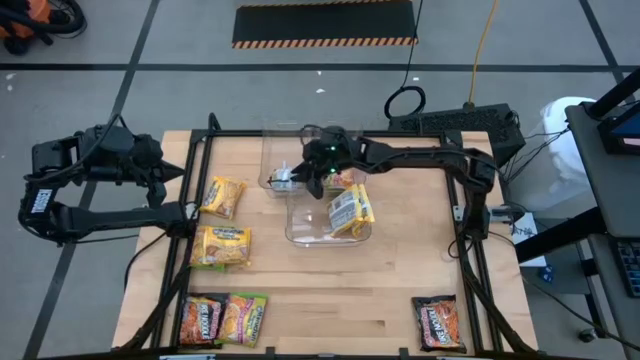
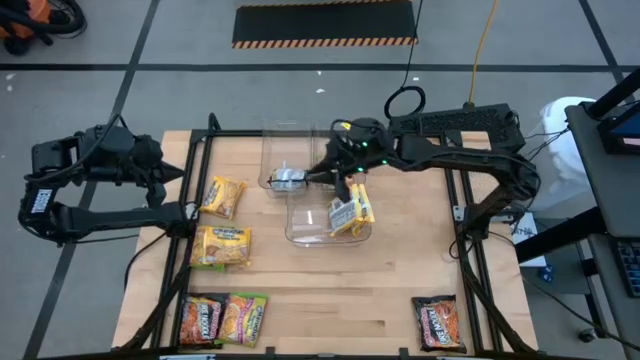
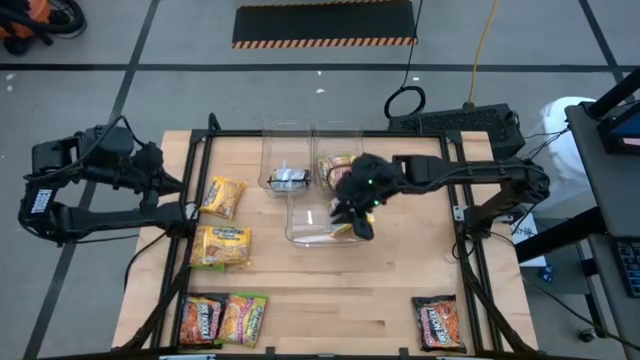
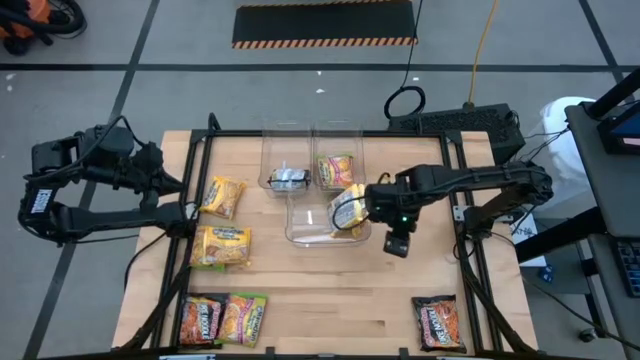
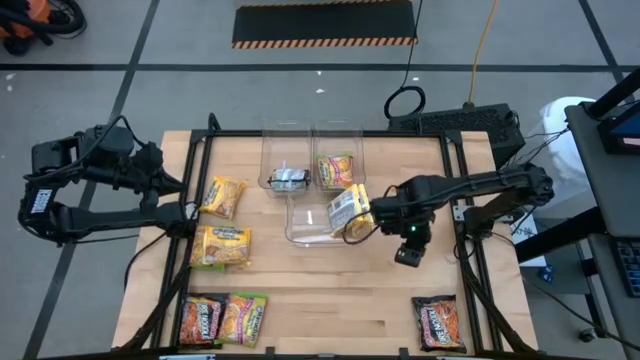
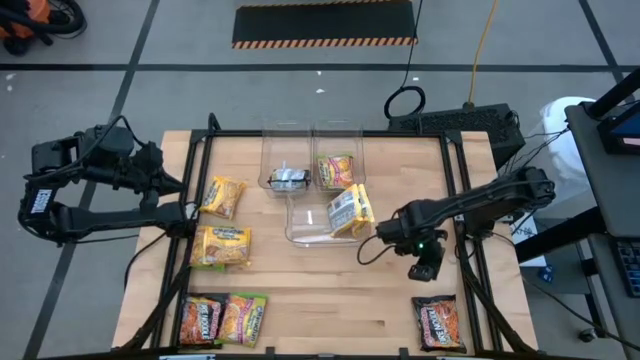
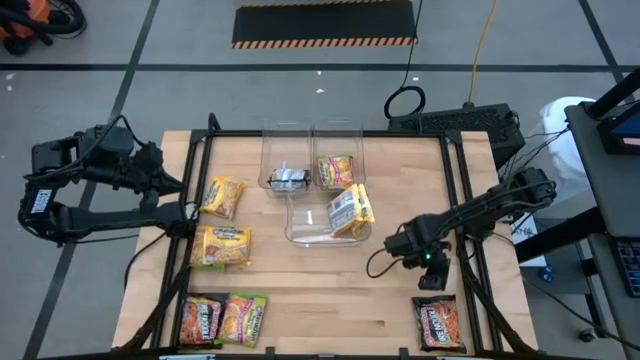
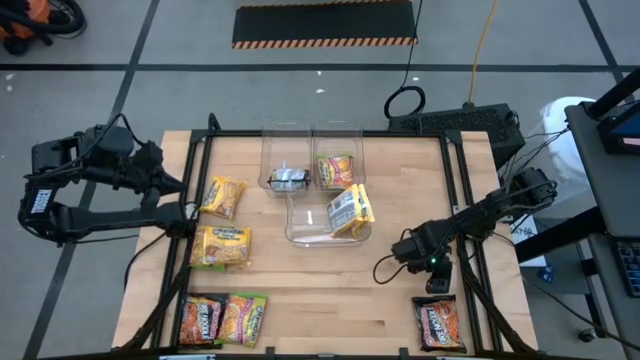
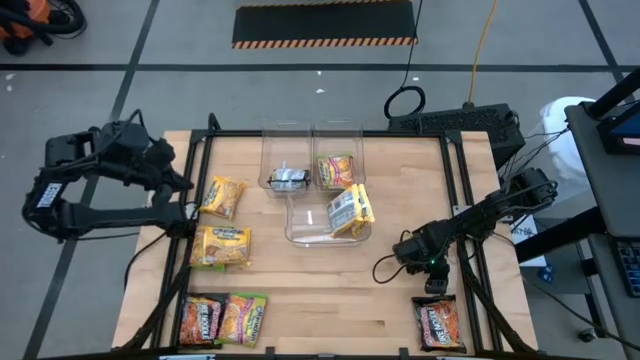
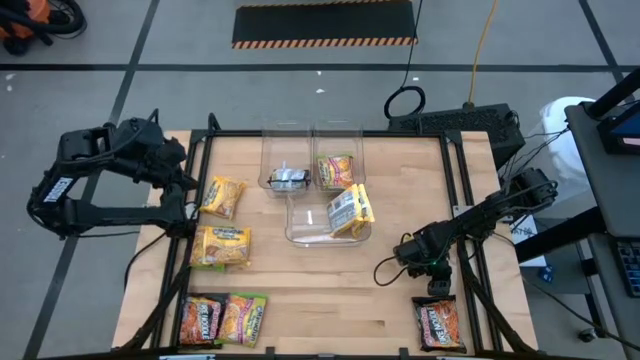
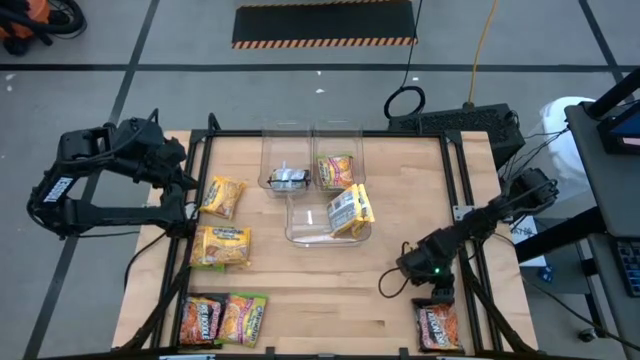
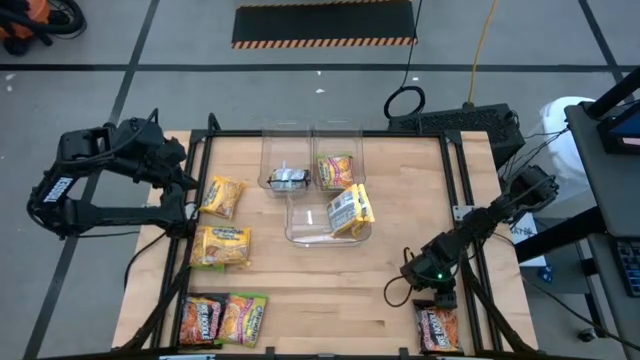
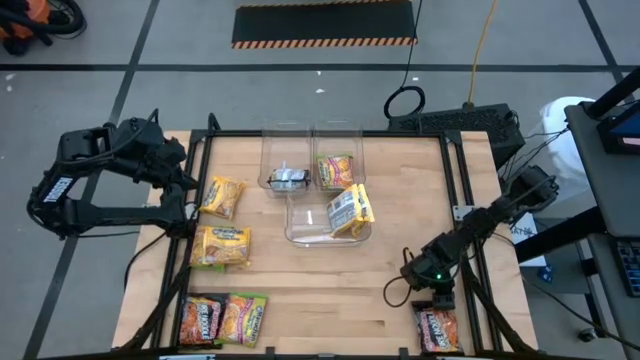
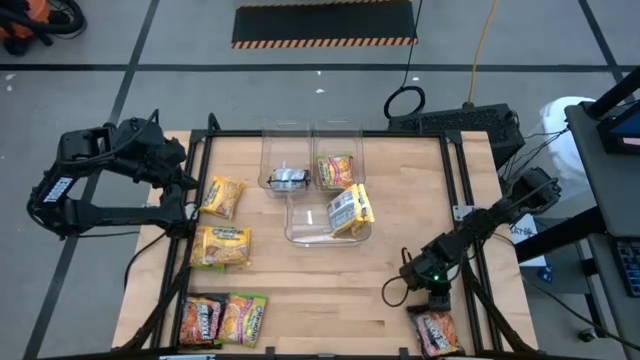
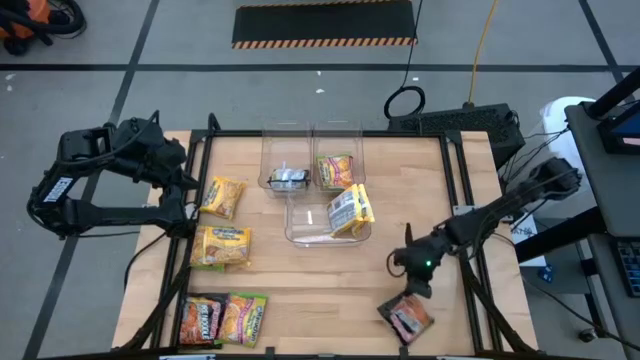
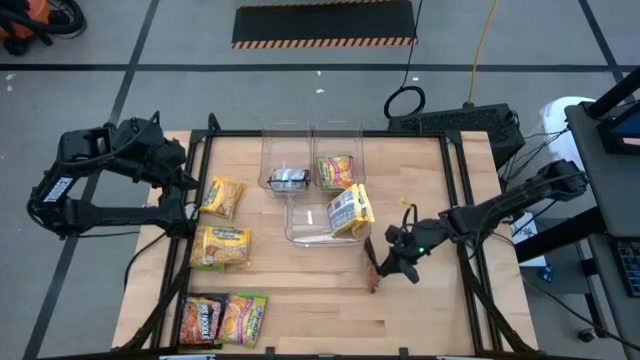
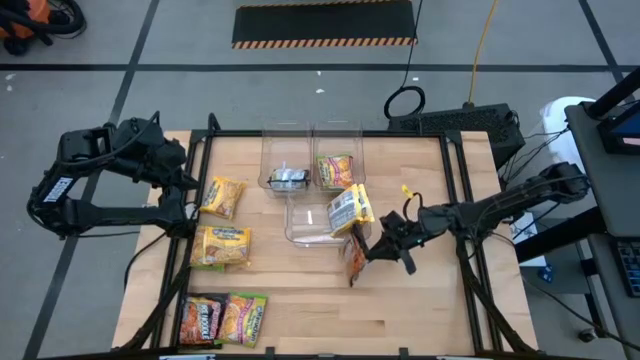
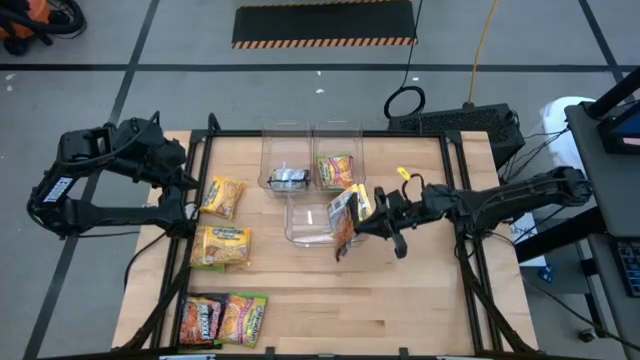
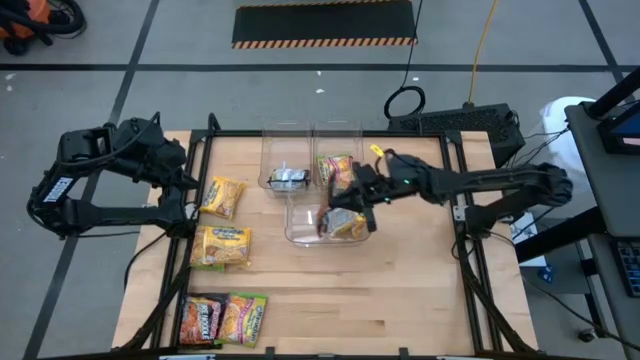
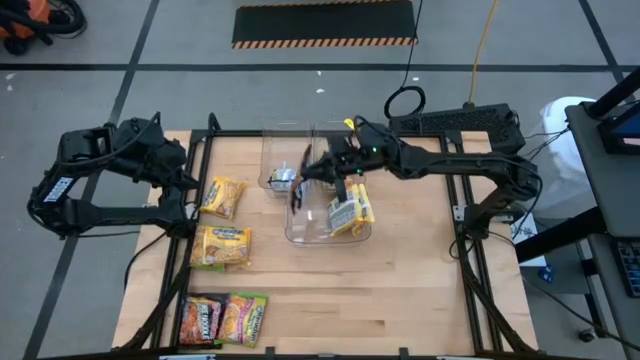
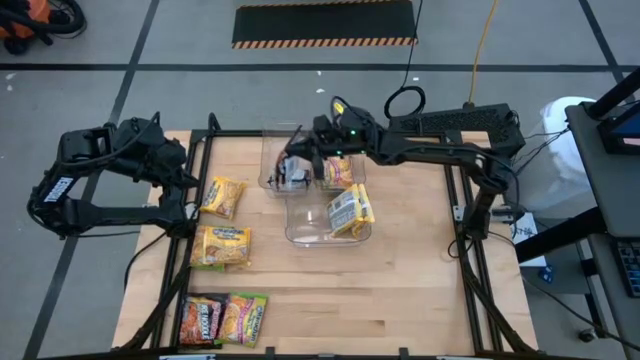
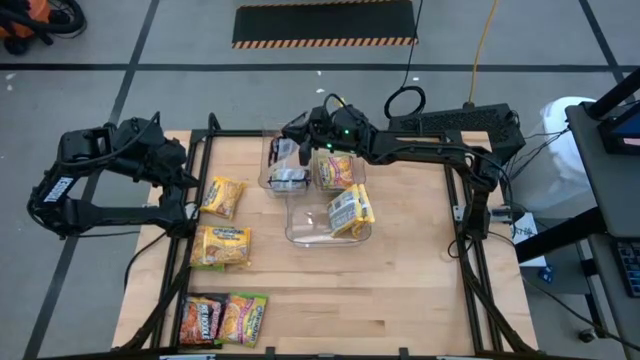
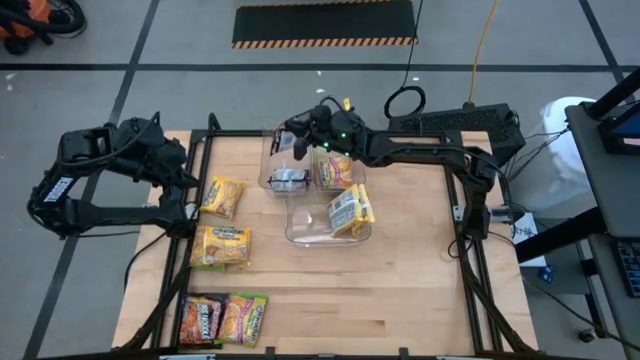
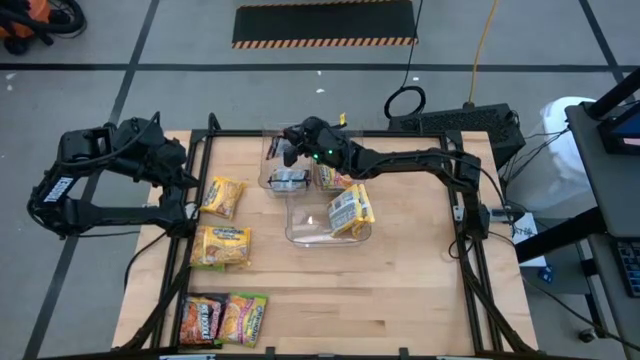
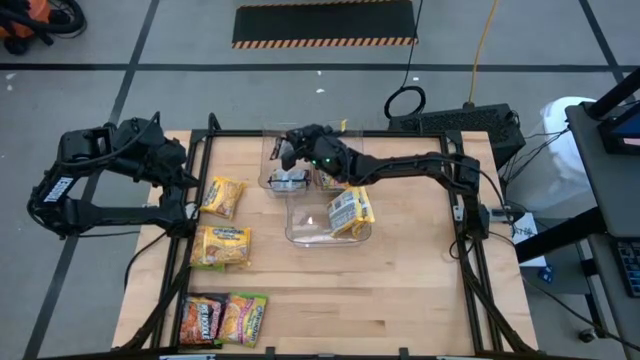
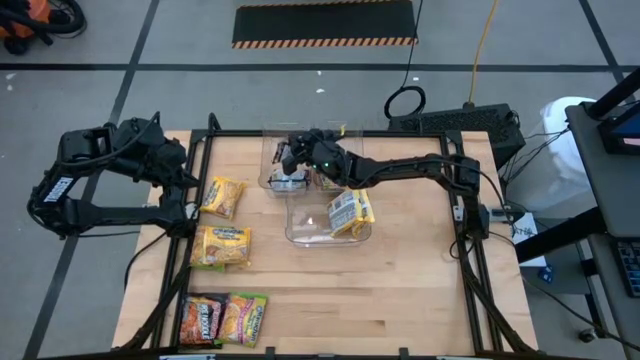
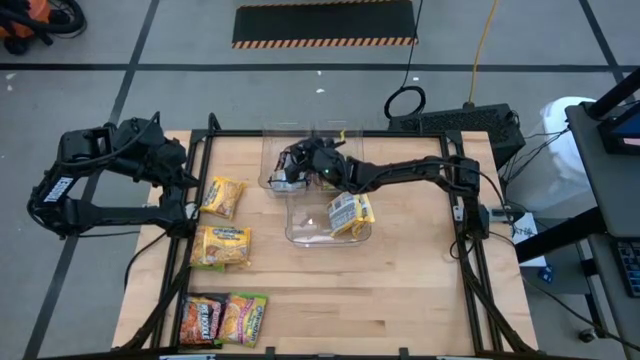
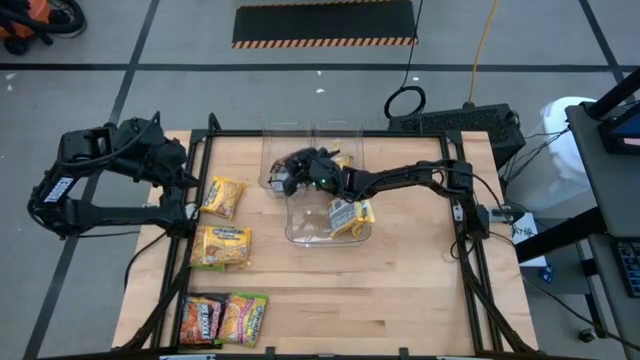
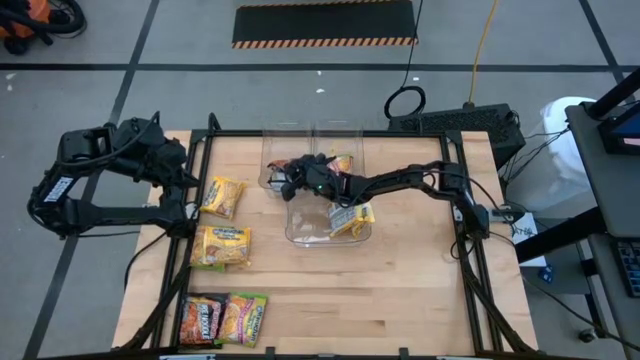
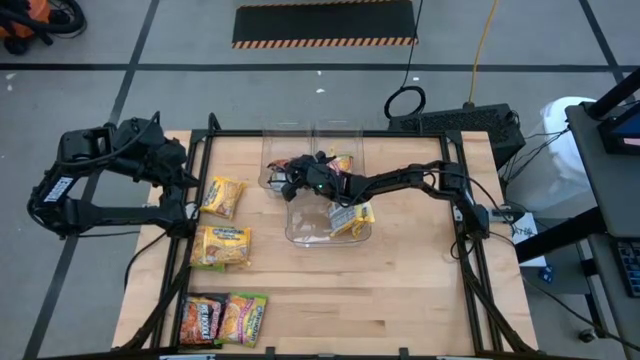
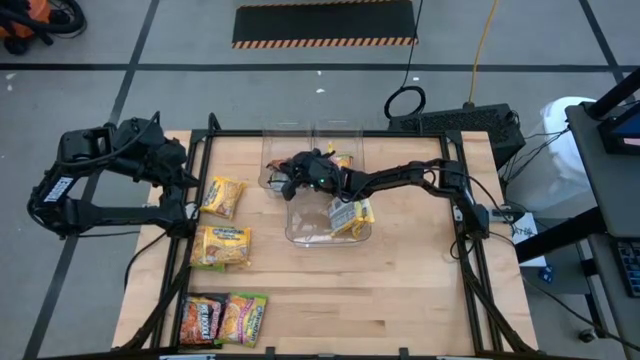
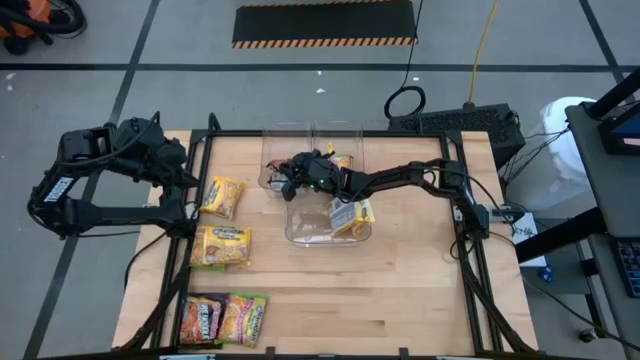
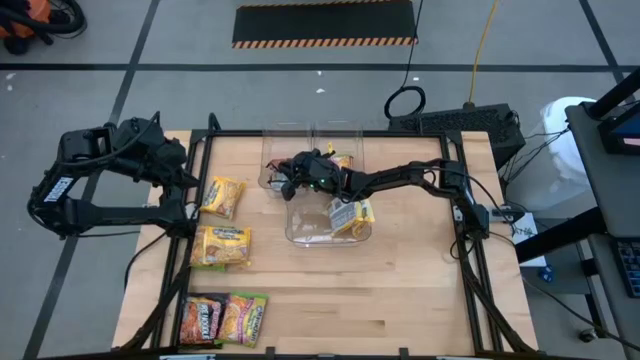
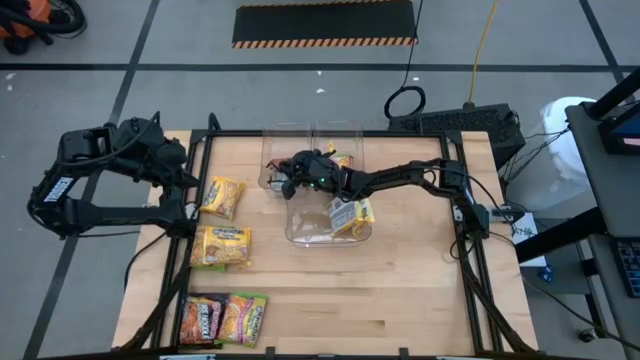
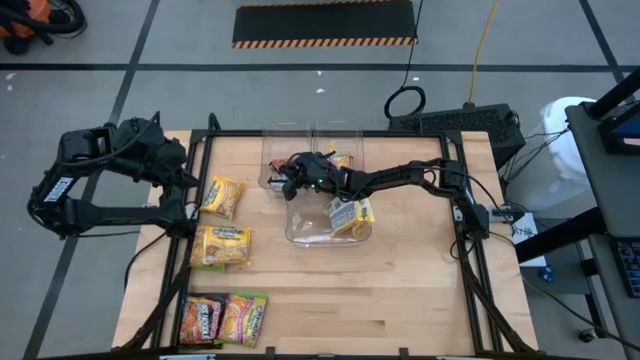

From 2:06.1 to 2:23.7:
Task: Sort Maruchan noodles
Put the black noodle pack into the top left transparent bin
